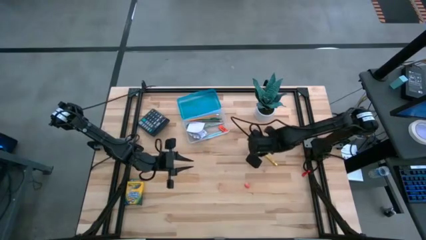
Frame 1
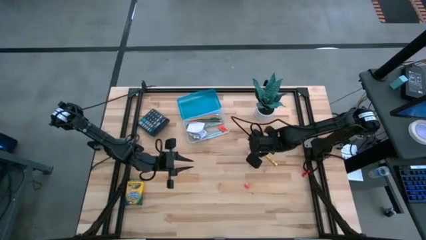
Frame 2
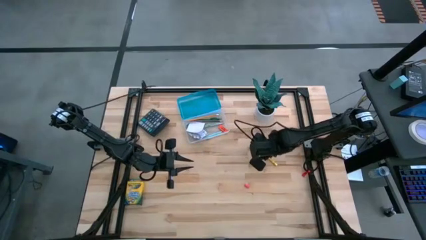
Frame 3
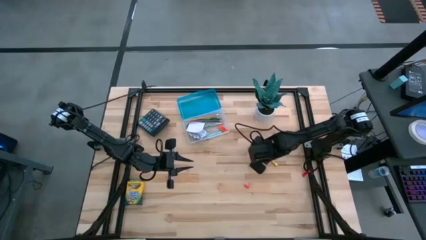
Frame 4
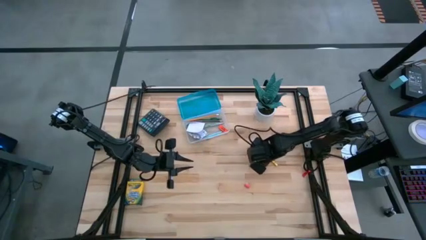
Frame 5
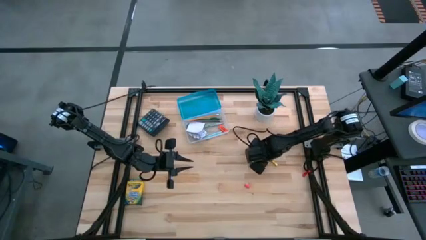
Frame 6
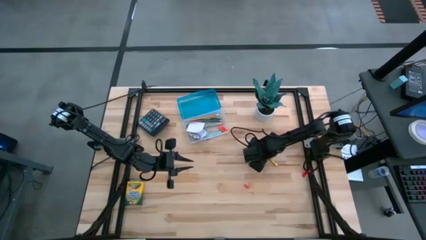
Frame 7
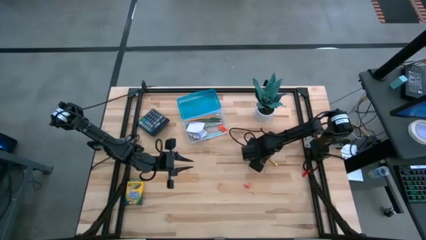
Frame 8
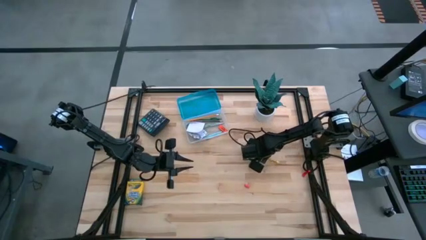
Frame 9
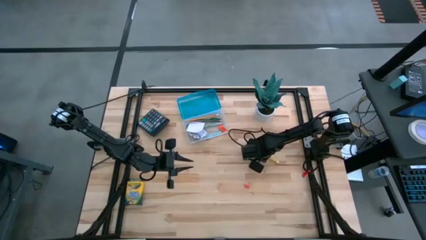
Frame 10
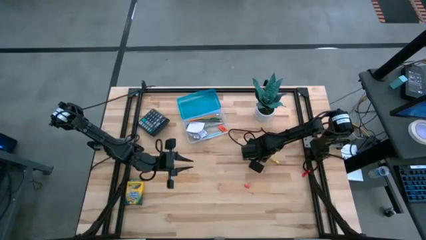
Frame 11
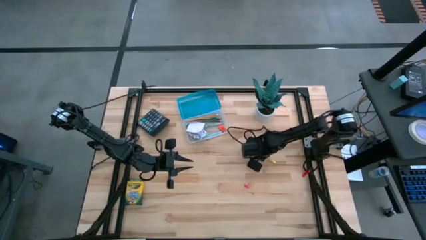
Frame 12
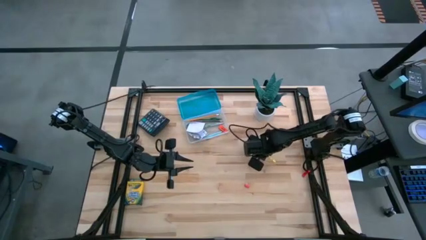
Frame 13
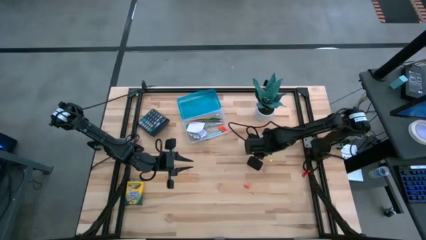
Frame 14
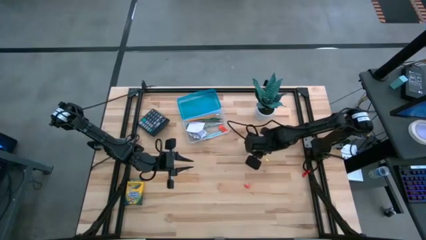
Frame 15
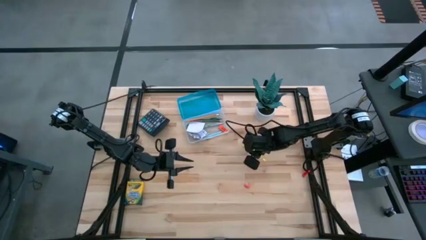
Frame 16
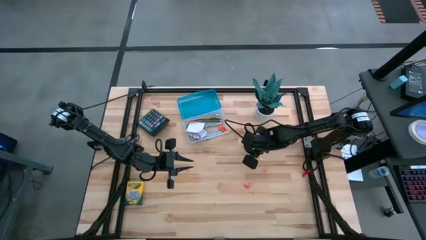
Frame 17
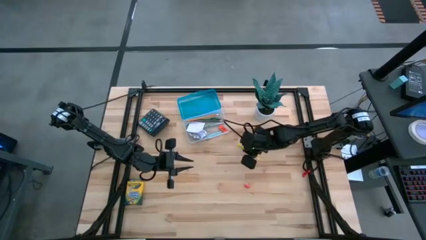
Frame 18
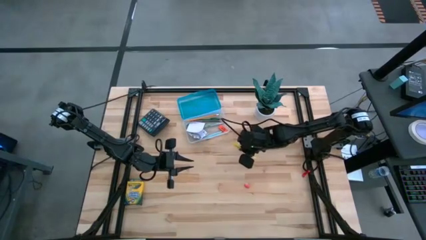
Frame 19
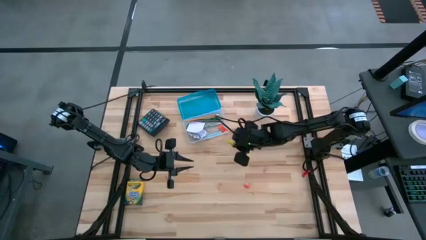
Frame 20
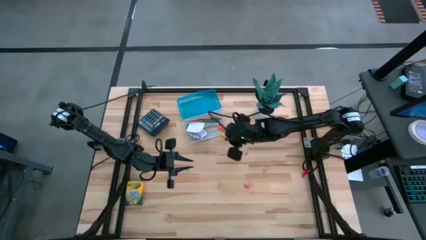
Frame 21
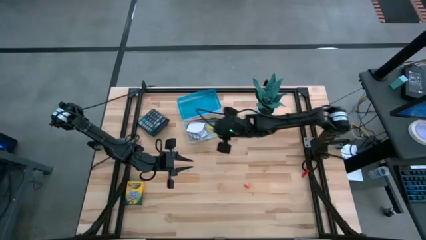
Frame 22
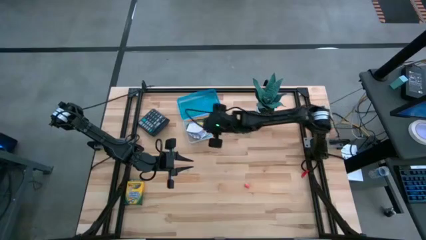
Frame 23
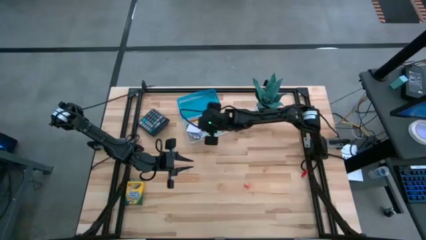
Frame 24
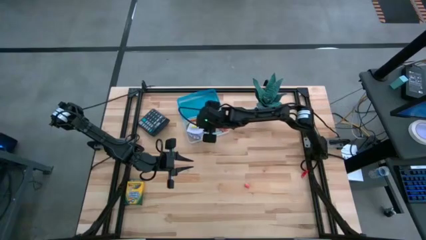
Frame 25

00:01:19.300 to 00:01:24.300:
Task: Pack school essentials
Put the yellow pen into the blue supply box

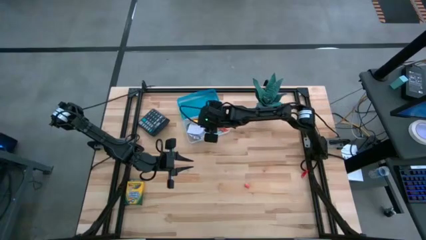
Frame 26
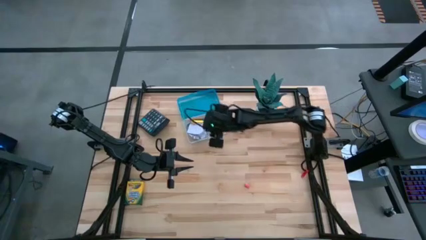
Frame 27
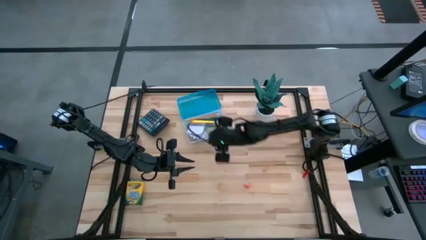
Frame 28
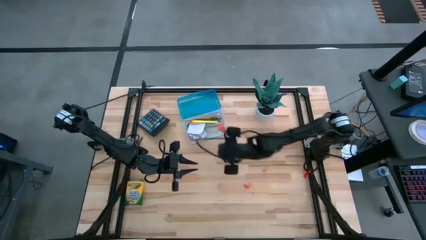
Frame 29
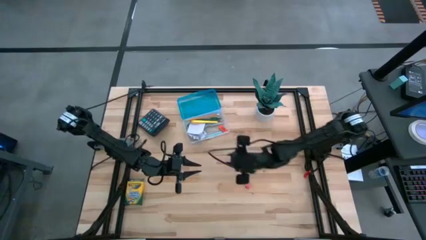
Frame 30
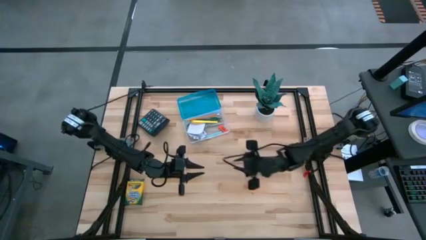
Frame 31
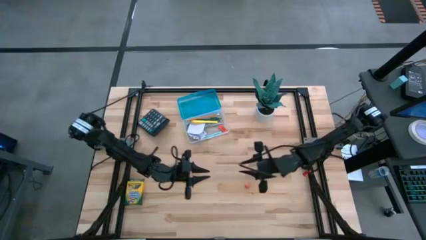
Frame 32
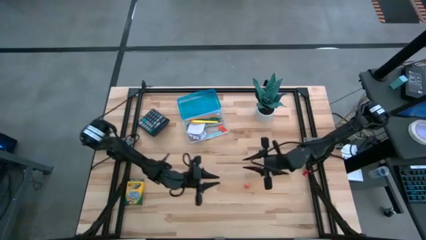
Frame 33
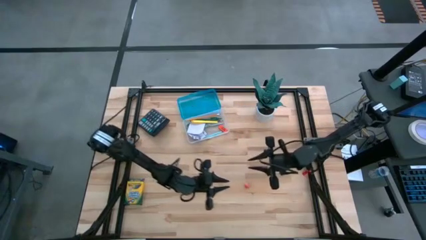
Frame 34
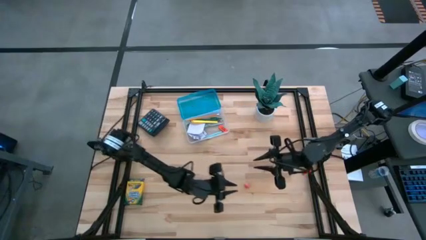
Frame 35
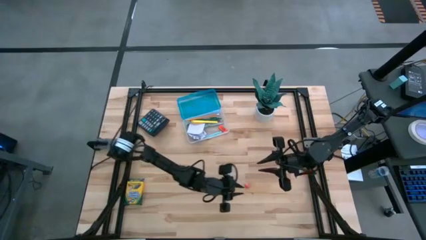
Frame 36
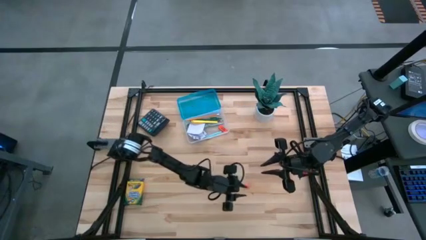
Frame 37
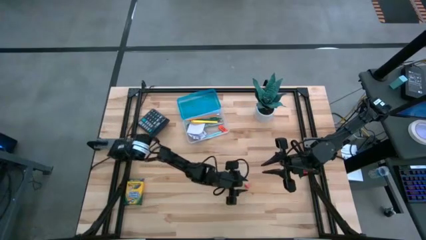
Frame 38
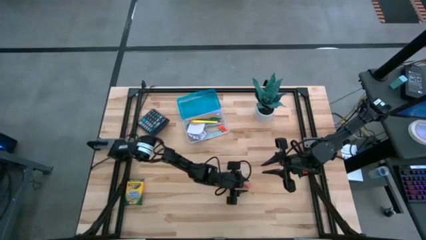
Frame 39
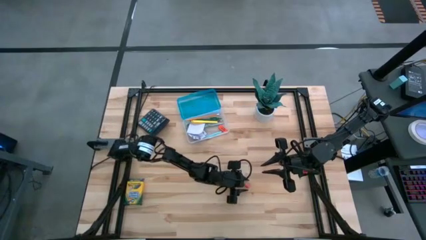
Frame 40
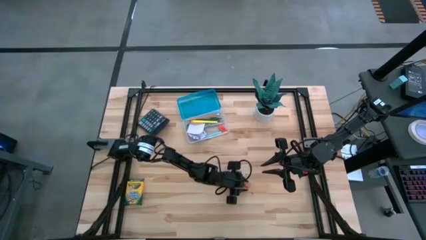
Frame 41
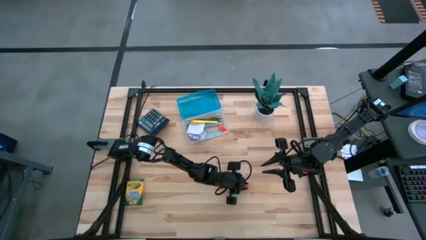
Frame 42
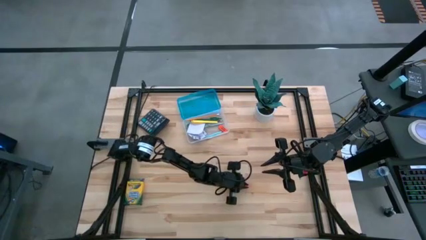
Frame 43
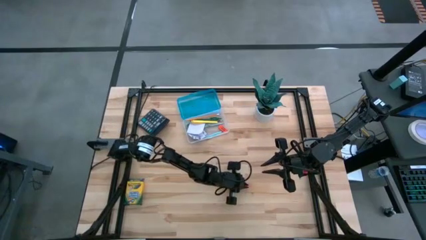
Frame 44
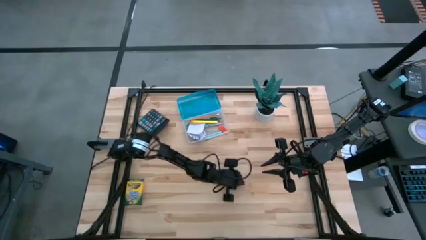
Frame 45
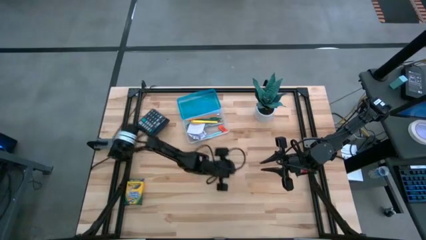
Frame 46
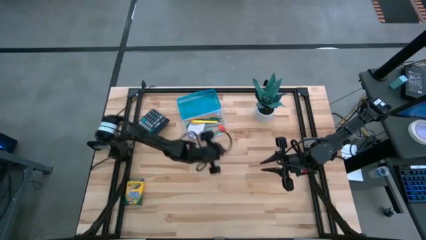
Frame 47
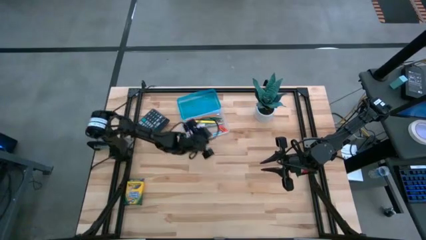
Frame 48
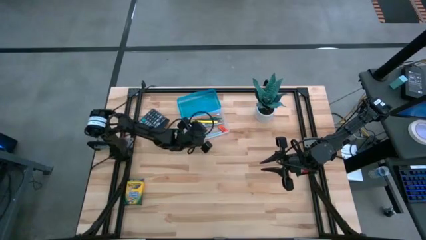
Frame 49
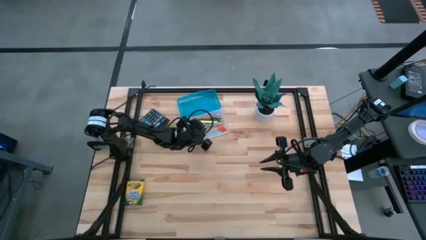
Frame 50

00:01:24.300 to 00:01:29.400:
Put the pink pencil top eraser into the blue supply box

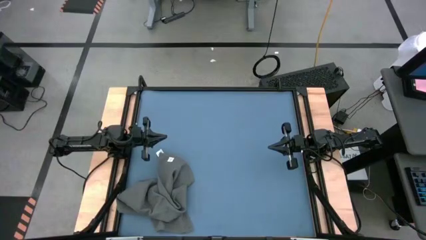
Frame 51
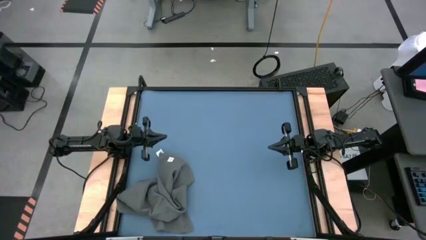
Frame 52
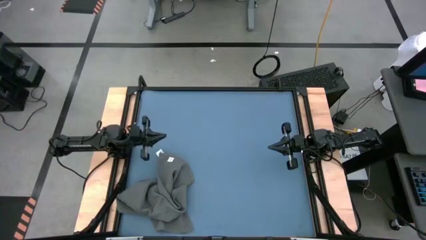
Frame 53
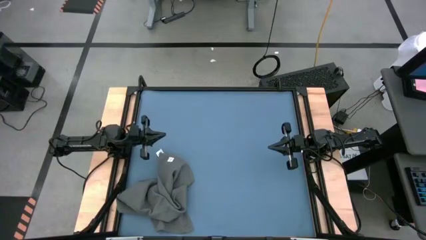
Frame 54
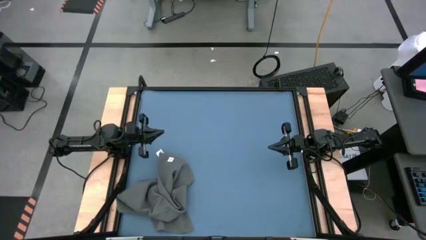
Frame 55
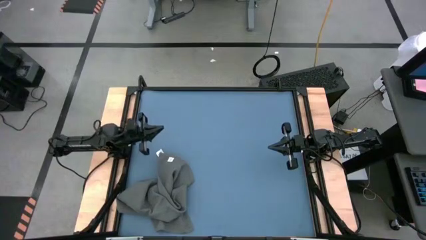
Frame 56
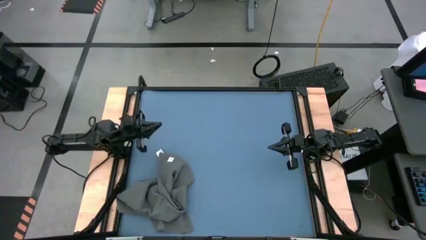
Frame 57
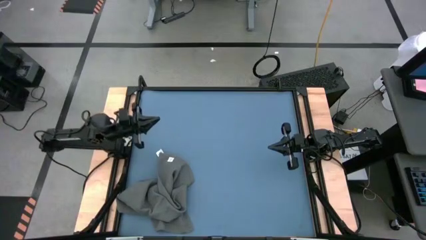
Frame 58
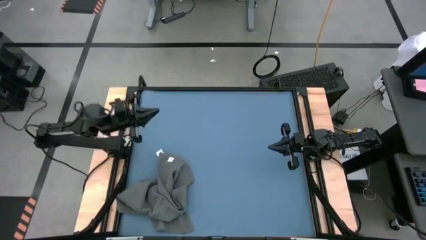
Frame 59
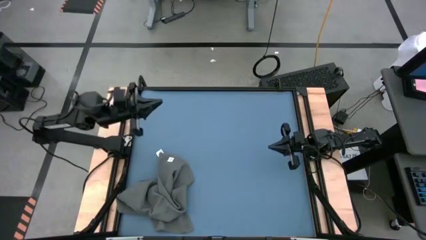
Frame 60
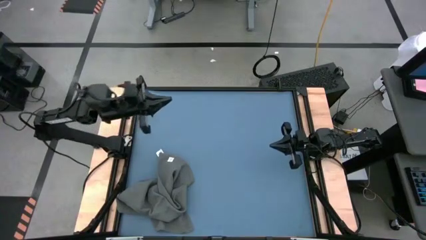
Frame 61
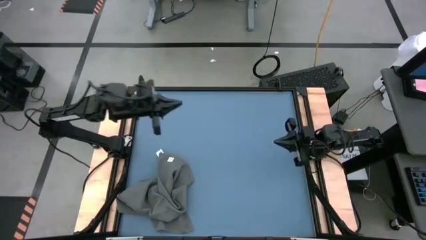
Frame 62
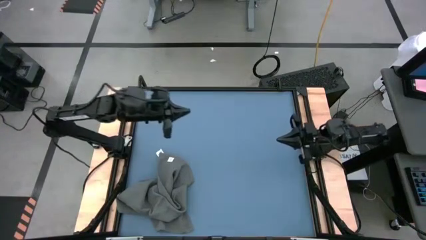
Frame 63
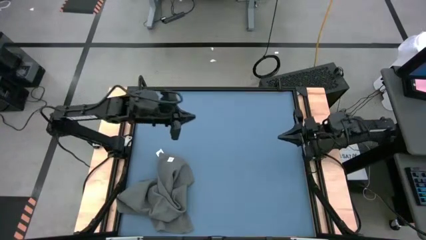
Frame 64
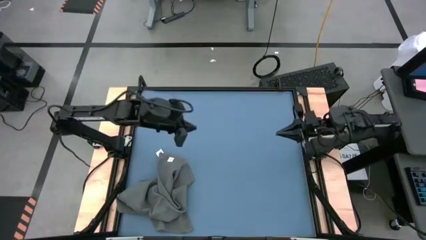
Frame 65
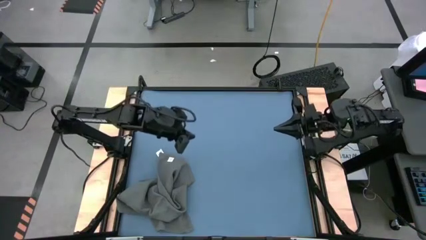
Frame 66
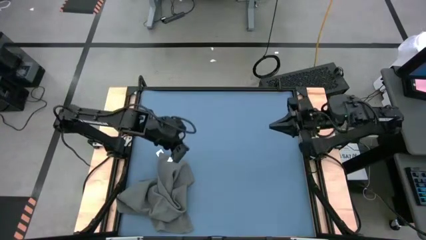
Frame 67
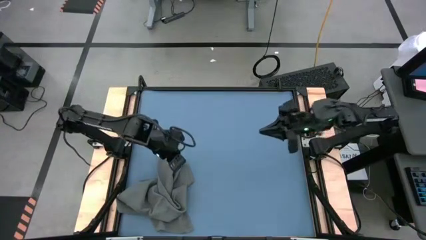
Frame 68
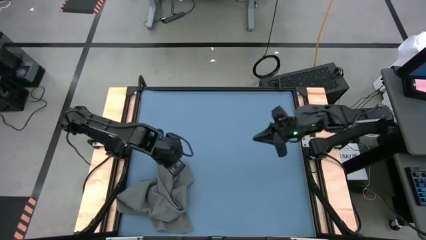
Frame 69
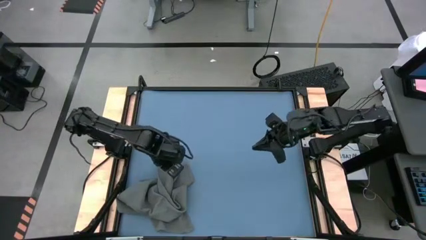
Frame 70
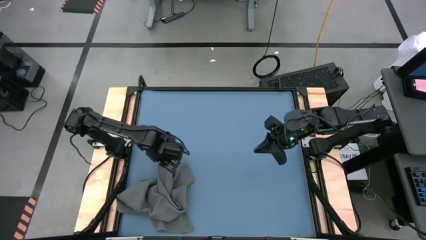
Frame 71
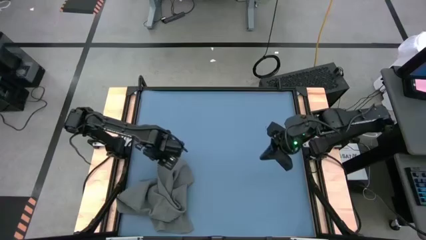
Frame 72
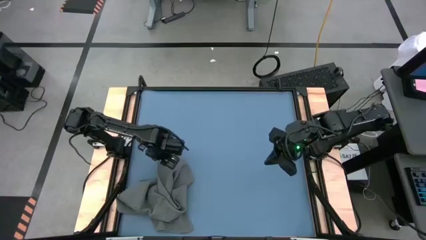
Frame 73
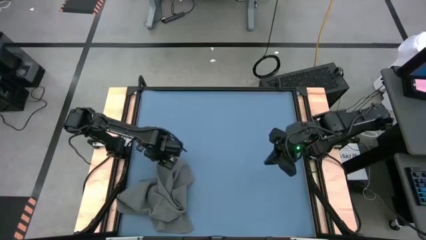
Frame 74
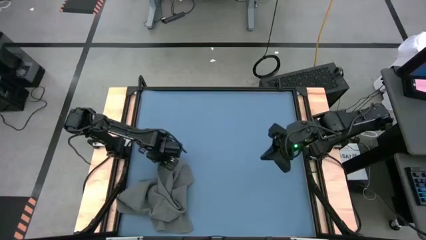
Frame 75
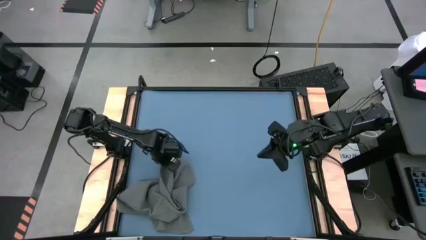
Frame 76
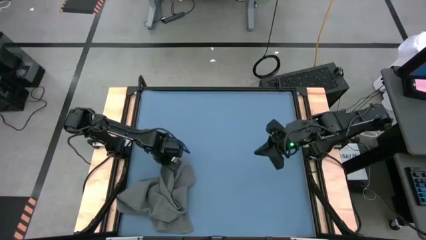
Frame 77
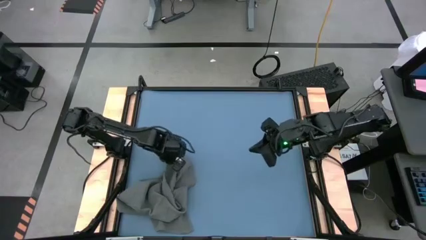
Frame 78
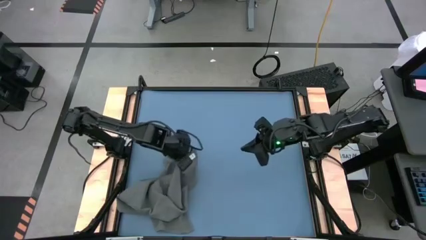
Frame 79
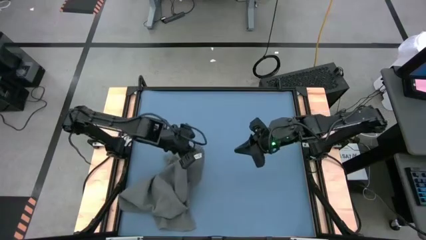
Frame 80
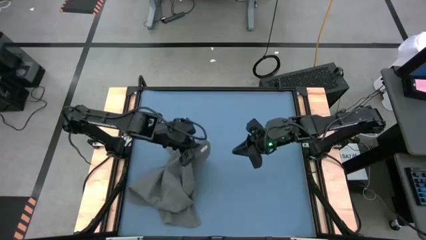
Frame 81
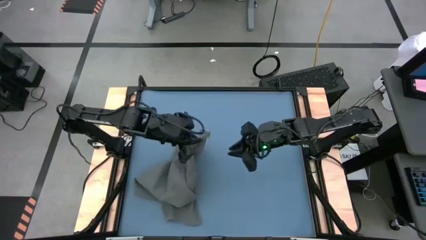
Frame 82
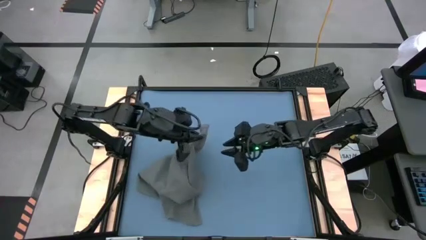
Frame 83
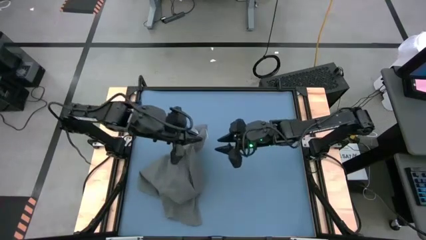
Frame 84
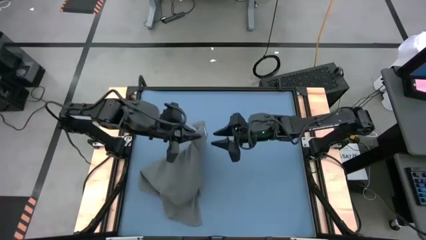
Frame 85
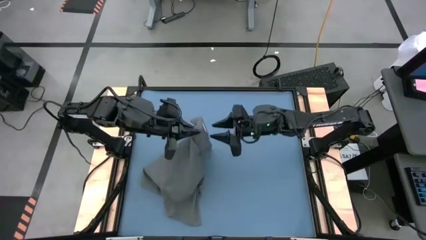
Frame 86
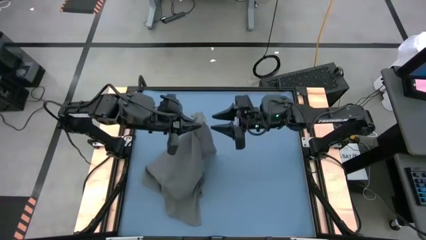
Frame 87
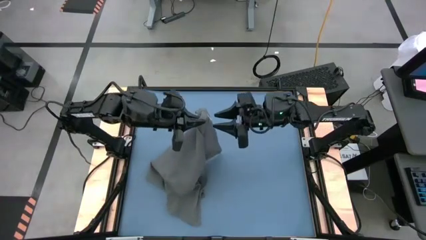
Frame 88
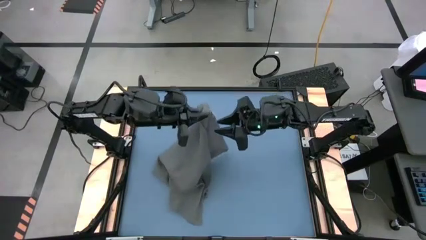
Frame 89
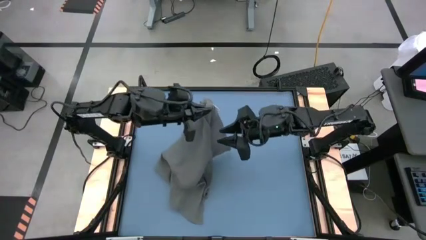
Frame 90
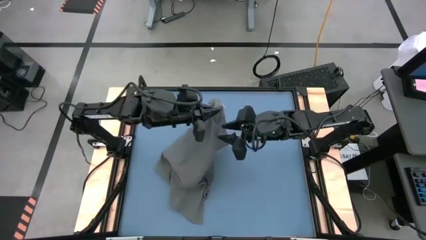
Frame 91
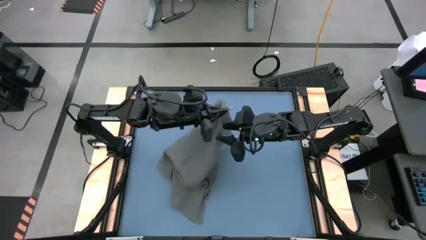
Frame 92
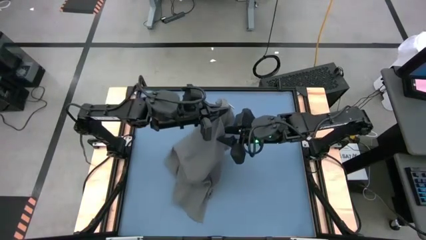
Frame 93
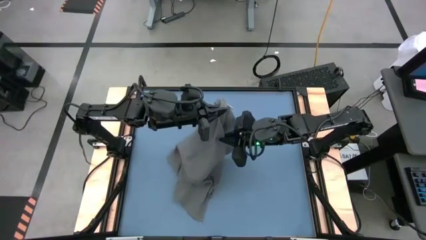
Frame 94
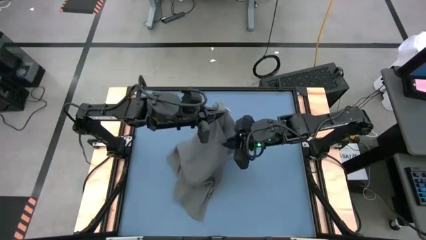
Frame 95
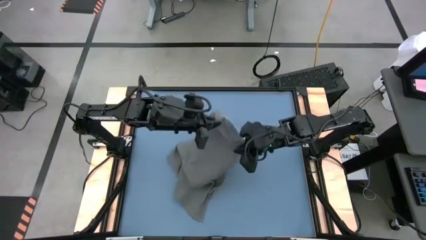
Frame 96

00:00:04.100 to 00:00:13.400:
Task: Roll towel
Fold the gray towel
